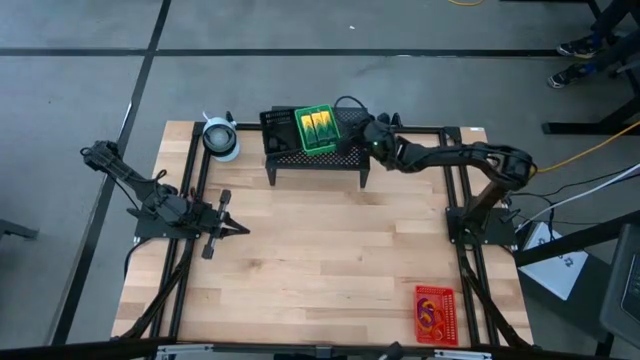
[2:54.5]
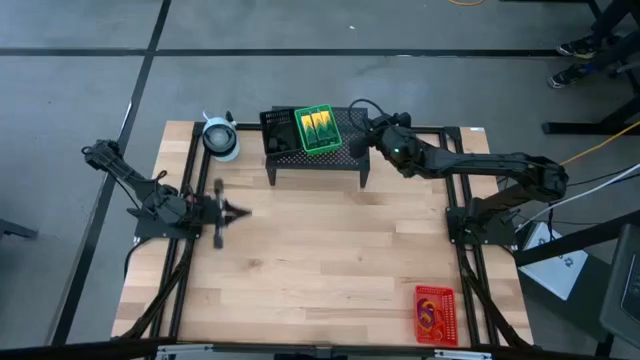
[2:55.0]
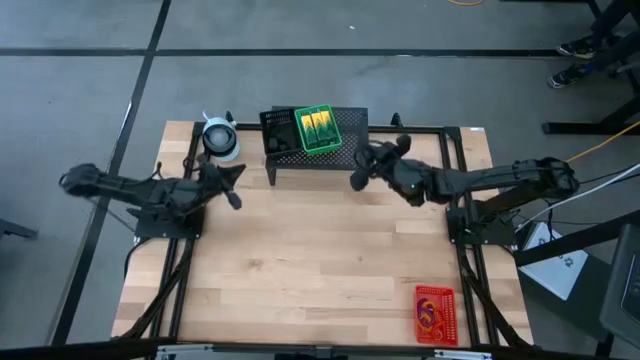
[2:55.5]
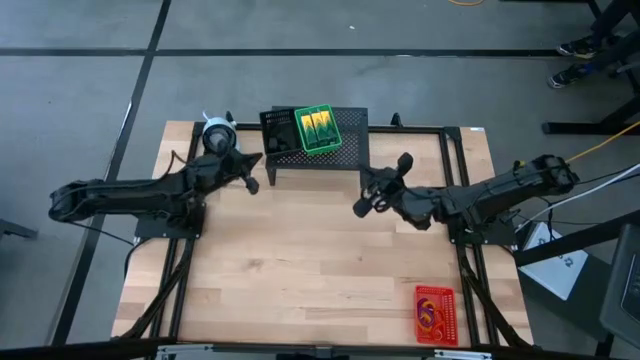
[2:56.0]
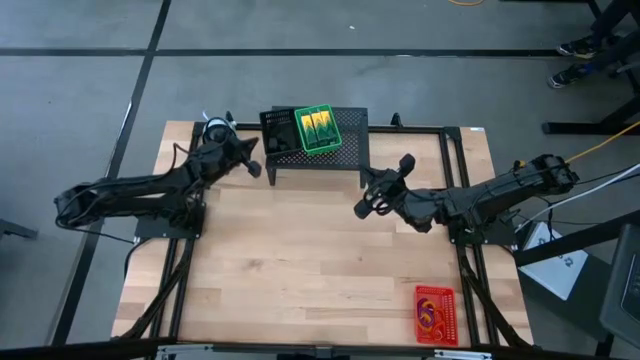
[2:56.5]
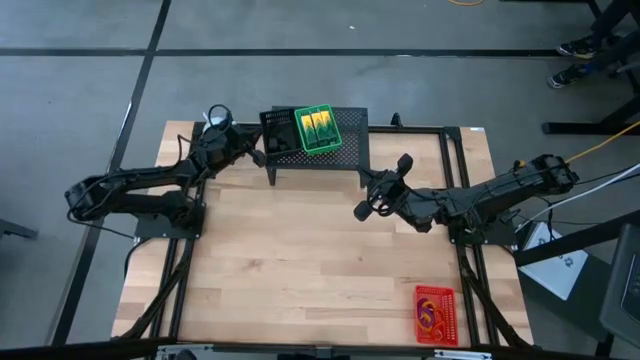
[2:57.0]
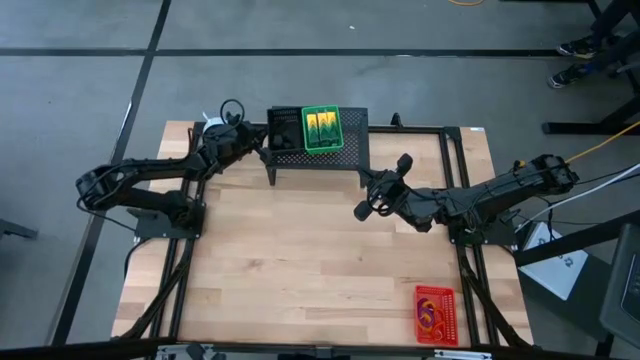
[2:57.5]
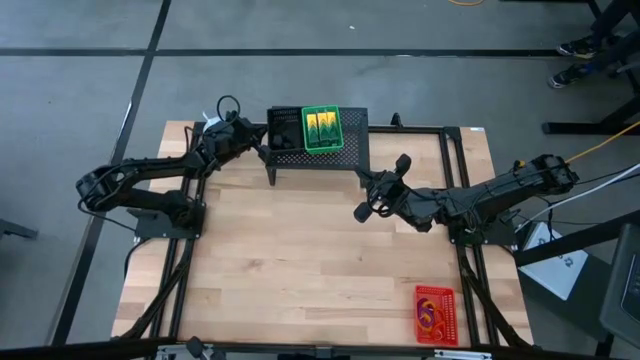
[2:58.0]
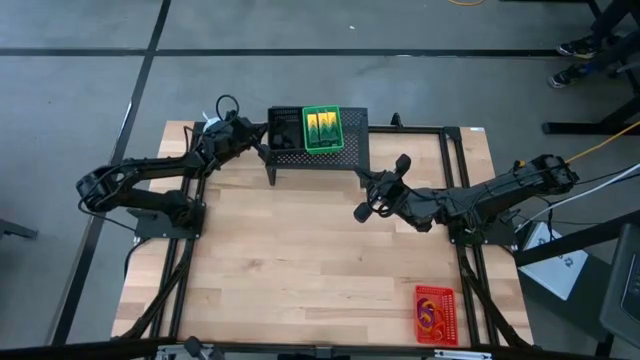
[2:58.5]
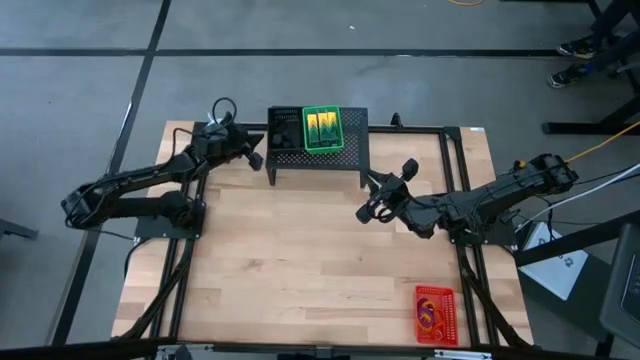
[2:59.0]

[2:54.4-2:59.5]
Task: Pick & Place Office Desk Supplies
Adjust the black bin on the shelf

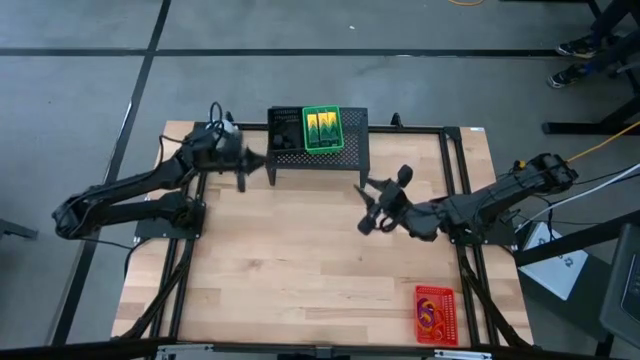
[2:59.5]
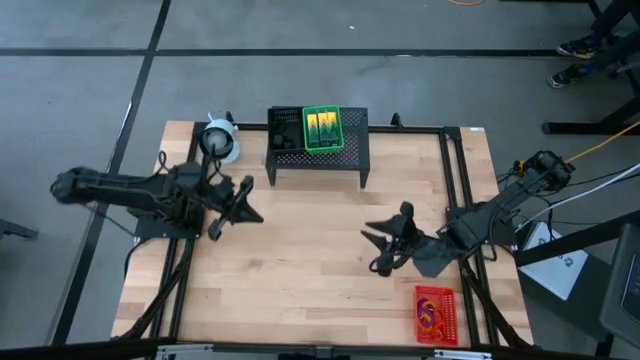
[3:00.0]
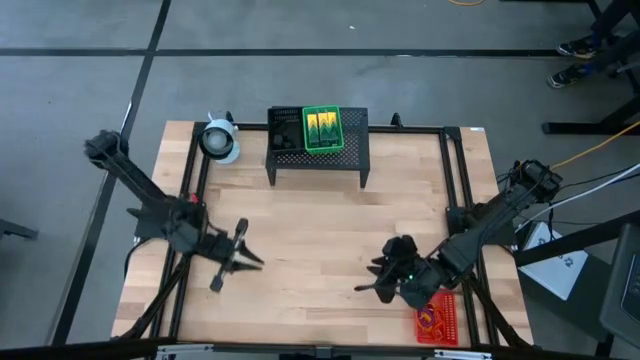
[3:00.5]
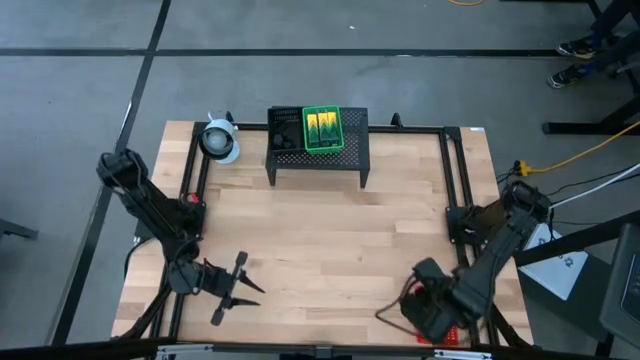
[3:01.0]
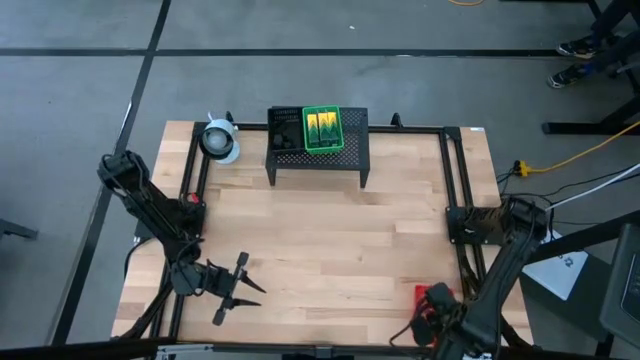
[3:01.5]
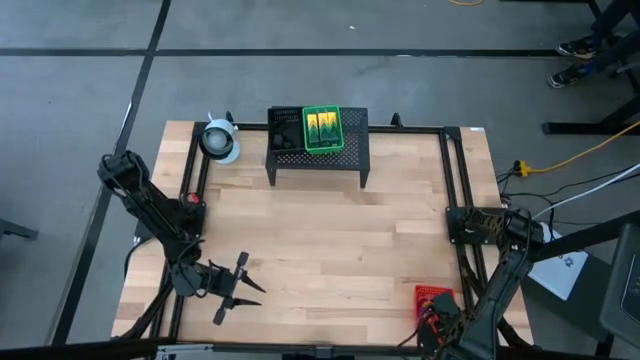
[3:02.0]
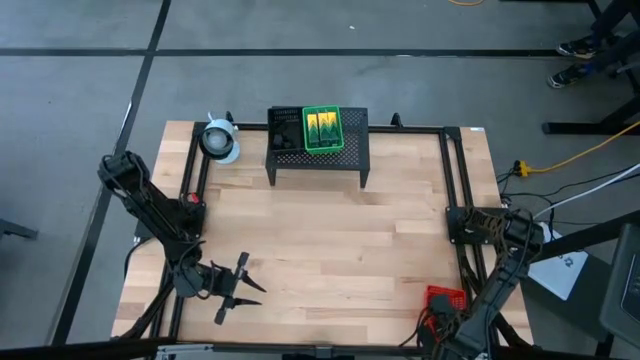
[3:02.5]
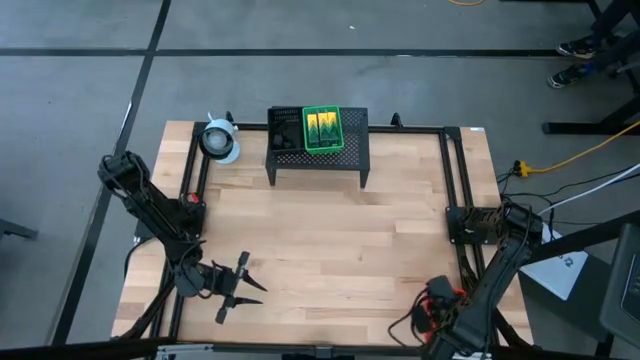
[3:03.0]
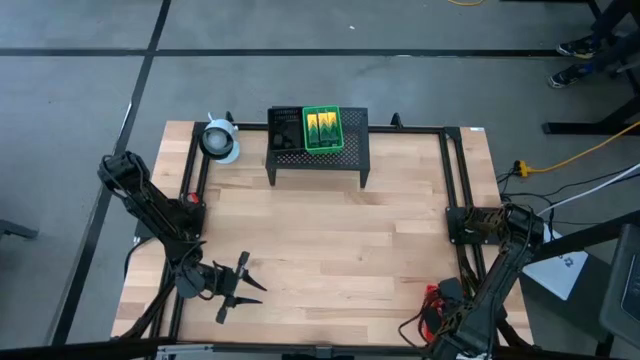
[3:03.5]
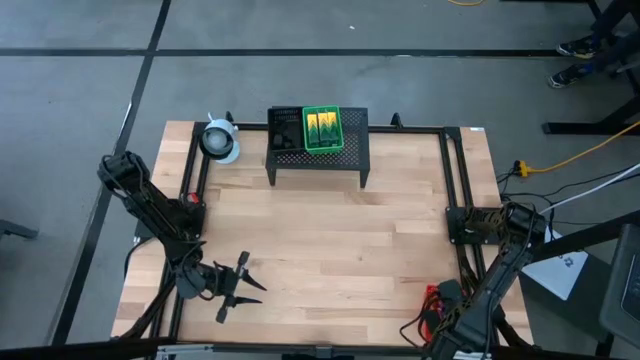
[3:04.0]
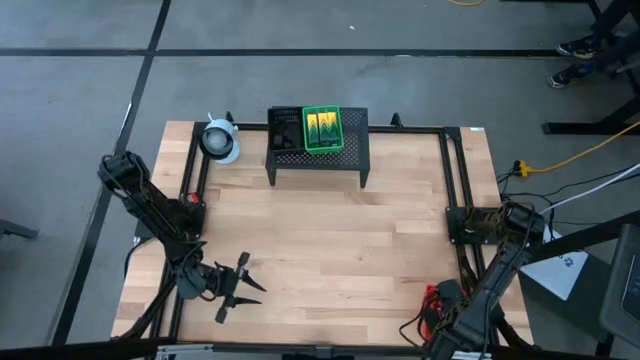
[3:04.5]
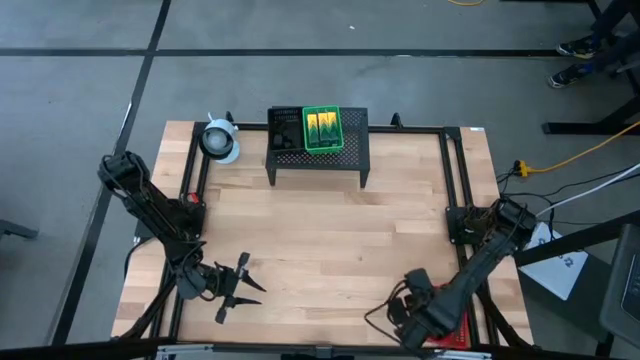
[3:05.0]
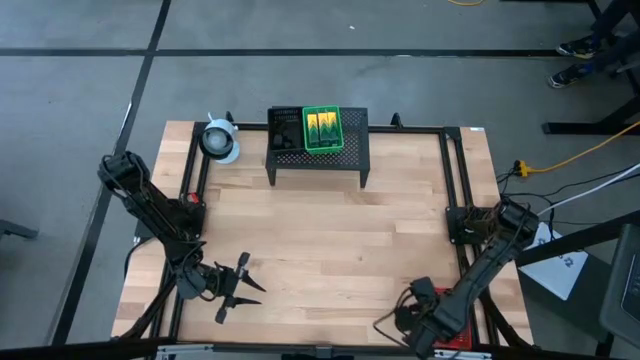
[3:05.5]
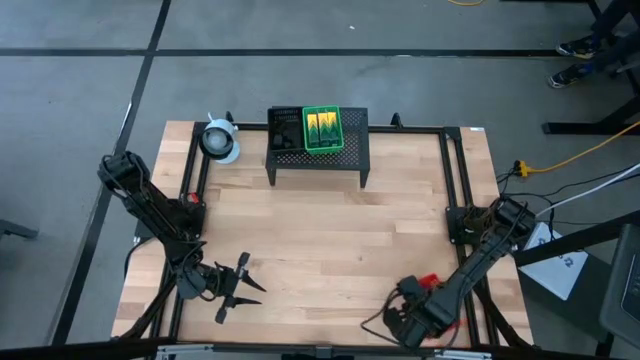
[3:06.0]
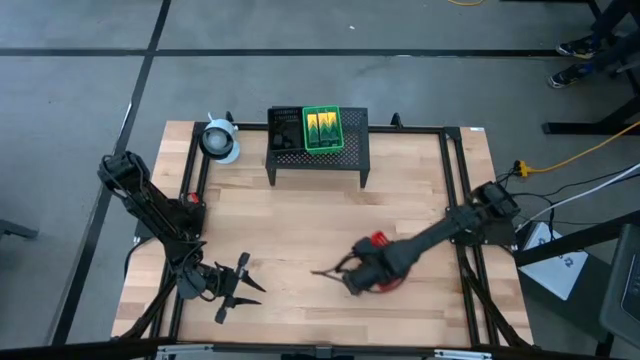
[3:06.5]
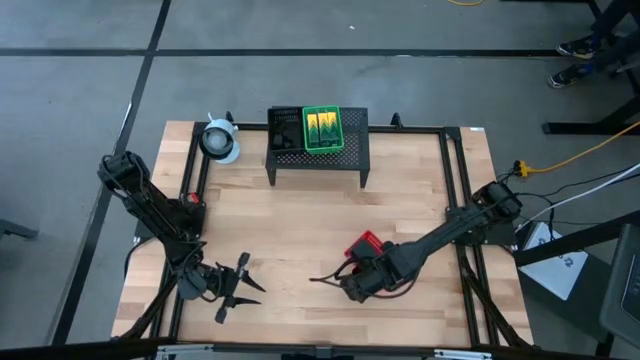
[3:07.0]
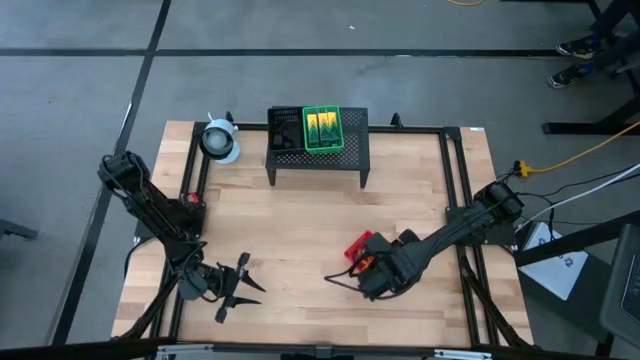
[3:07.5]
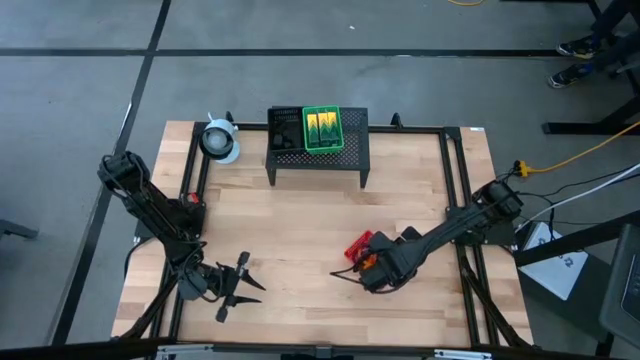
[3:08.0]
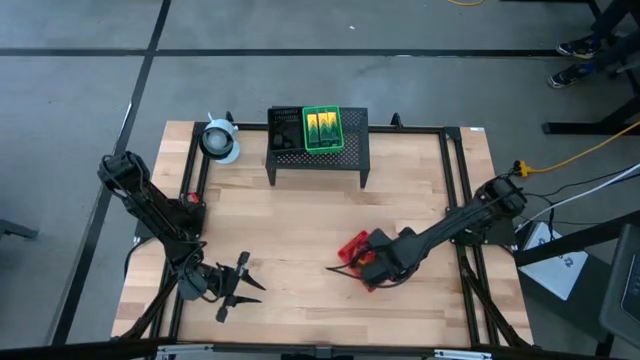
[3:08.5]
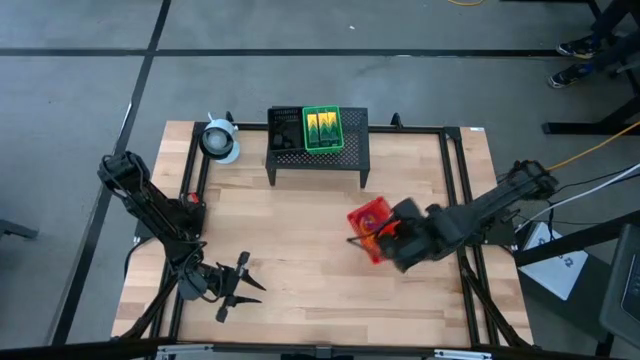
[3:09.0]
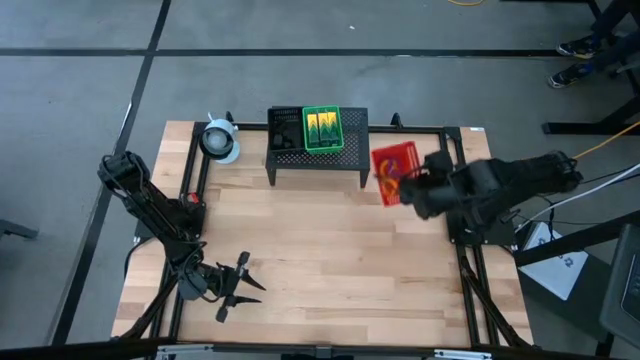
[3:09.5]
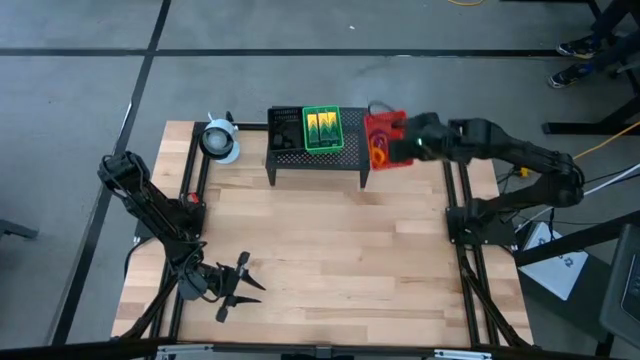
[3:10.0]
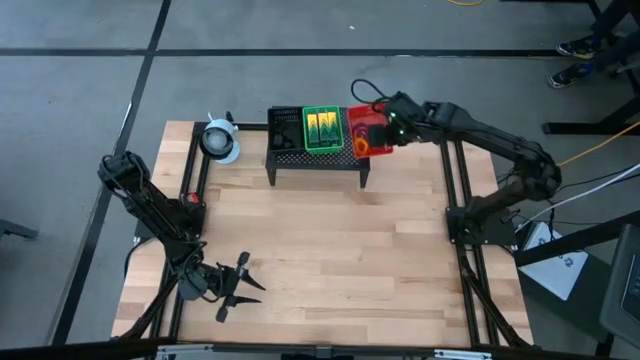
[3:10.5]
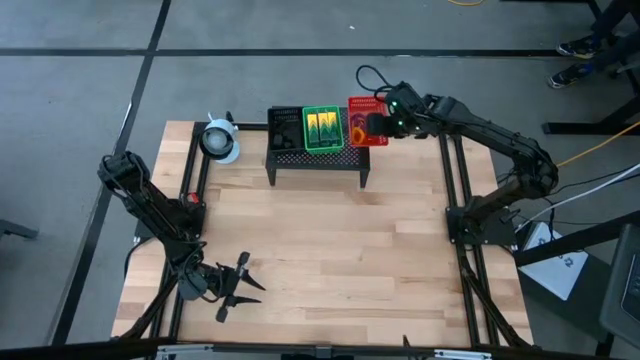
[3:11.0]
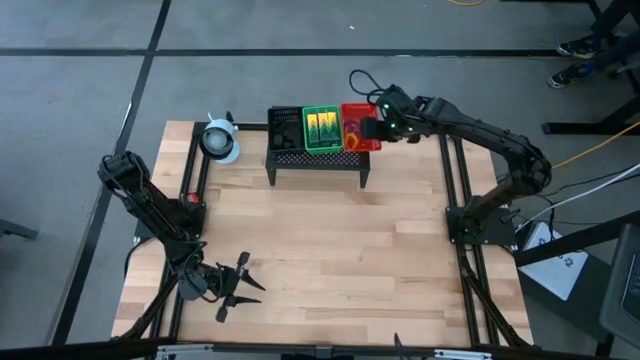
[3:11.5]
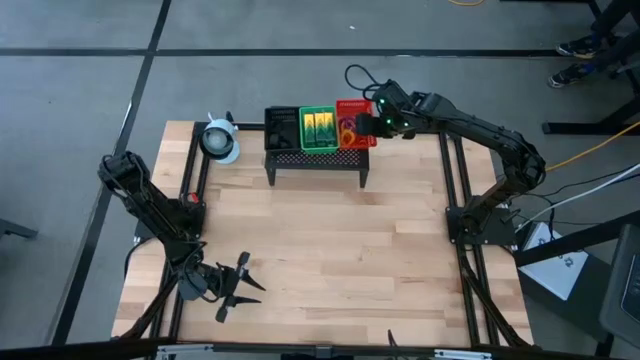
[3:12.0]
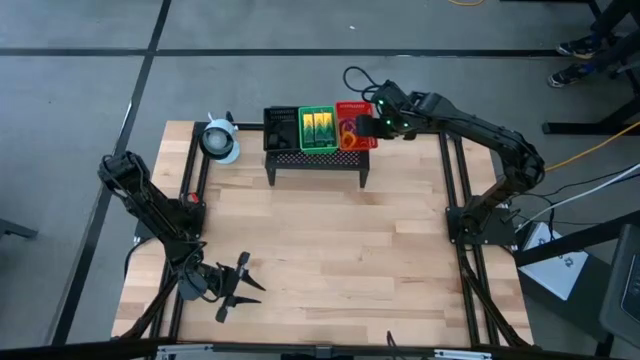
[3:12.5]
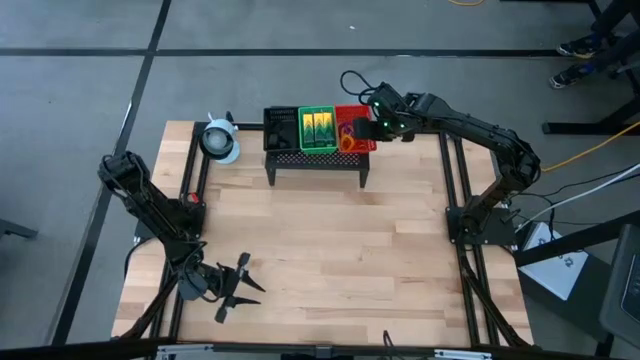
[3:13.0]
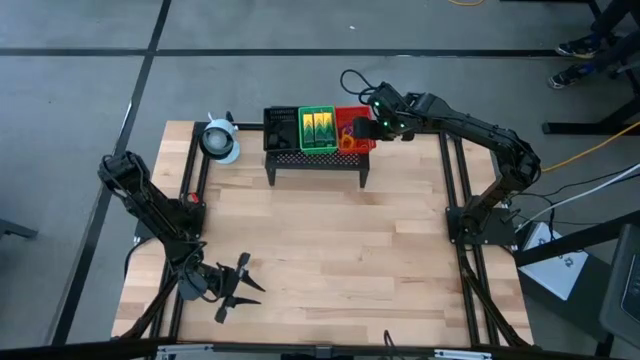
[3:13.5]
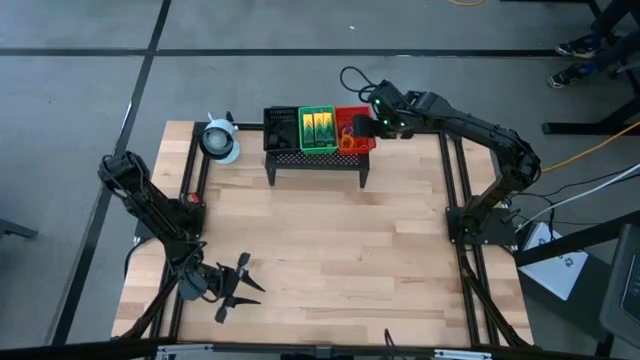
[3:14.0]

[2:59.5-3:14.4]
Put the red bin with spring keychains on the shelf
